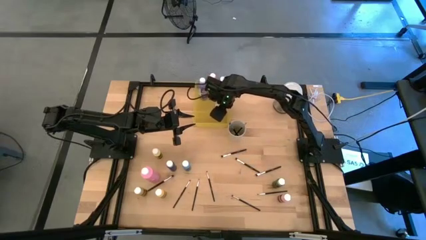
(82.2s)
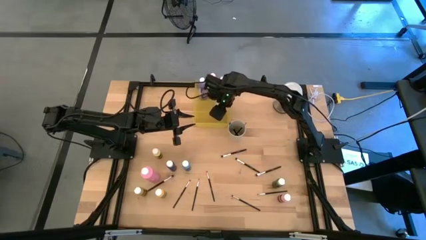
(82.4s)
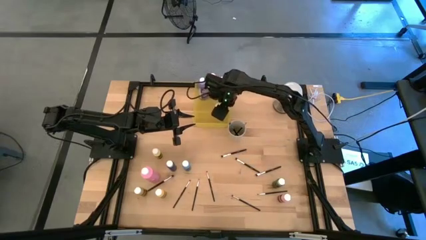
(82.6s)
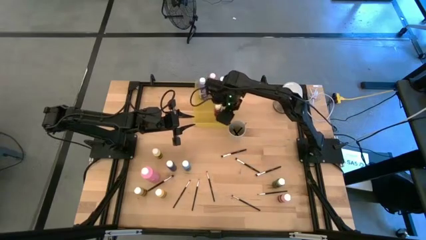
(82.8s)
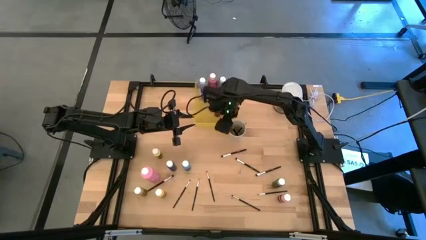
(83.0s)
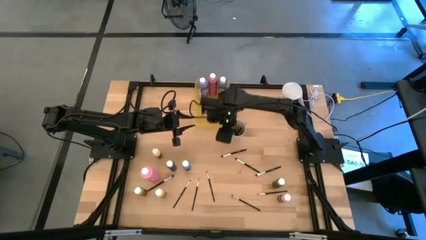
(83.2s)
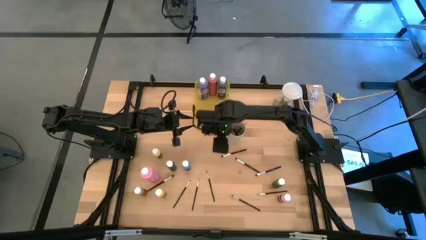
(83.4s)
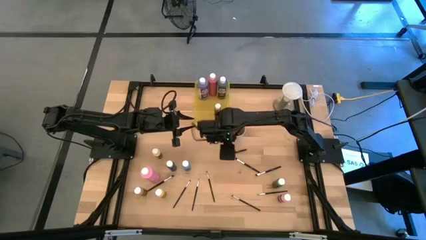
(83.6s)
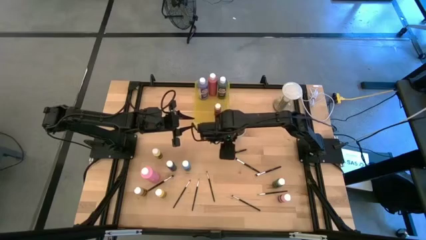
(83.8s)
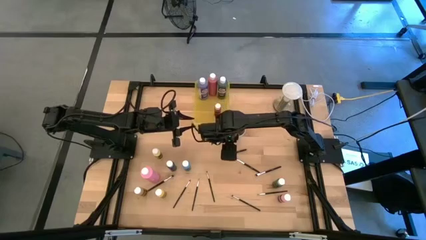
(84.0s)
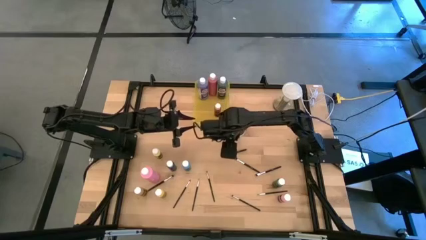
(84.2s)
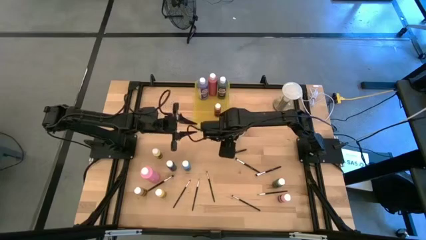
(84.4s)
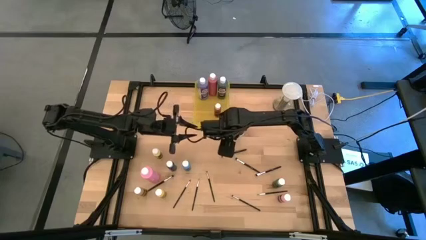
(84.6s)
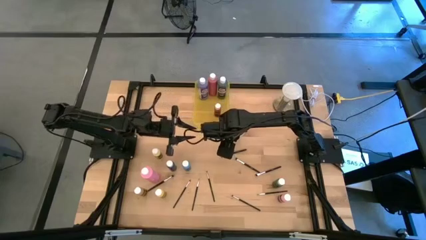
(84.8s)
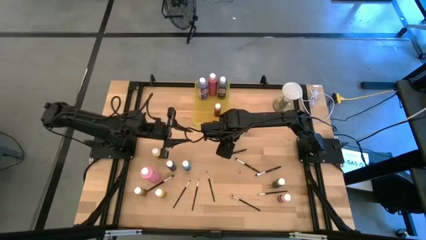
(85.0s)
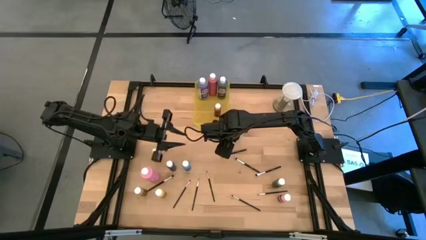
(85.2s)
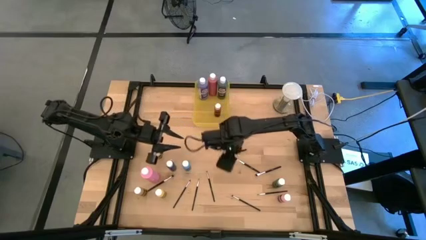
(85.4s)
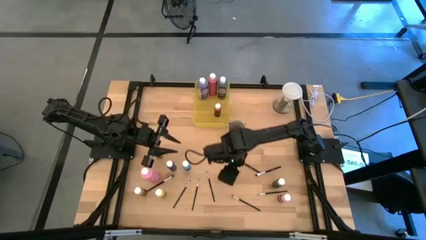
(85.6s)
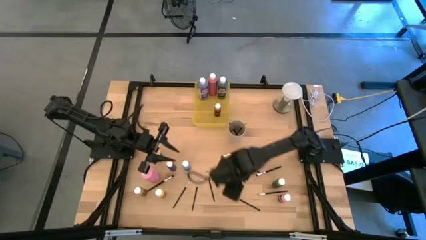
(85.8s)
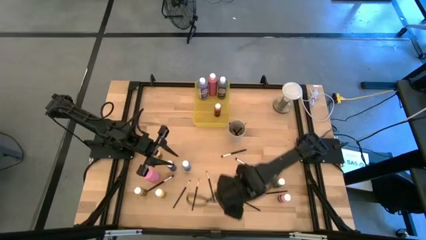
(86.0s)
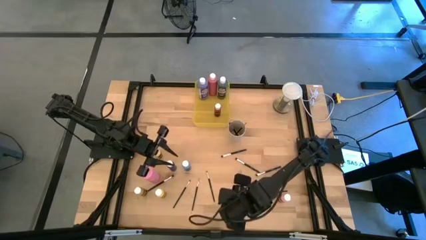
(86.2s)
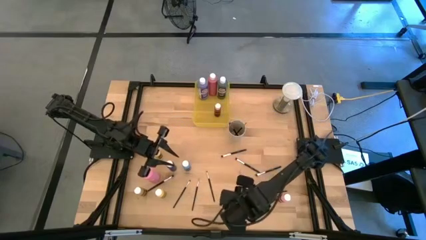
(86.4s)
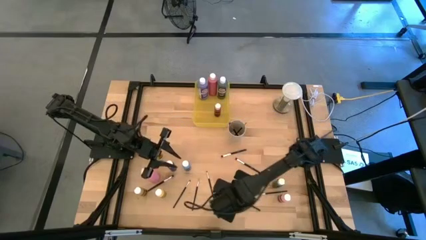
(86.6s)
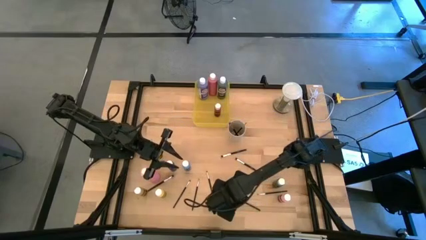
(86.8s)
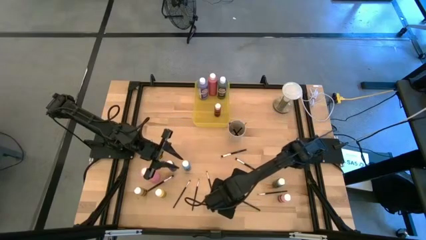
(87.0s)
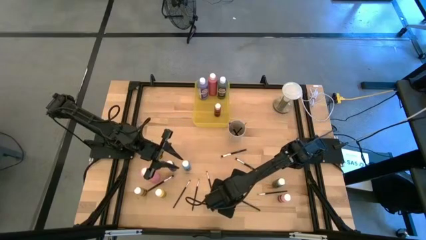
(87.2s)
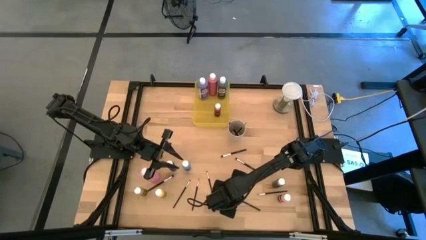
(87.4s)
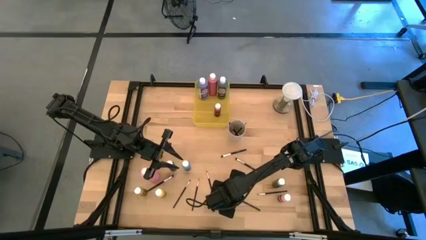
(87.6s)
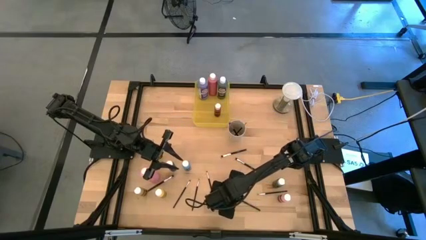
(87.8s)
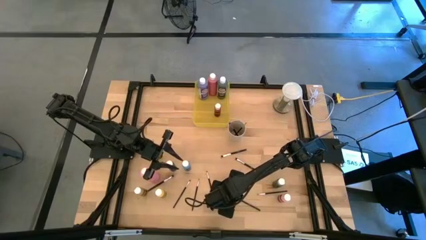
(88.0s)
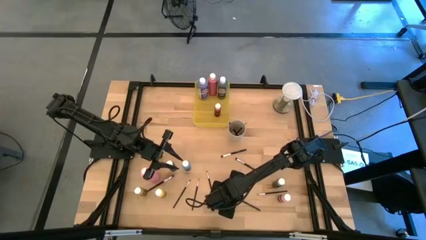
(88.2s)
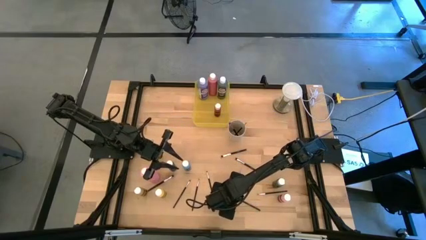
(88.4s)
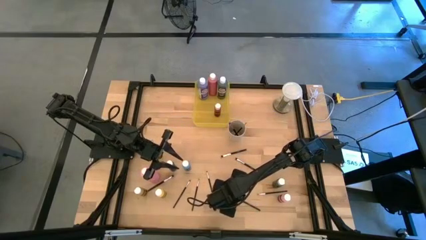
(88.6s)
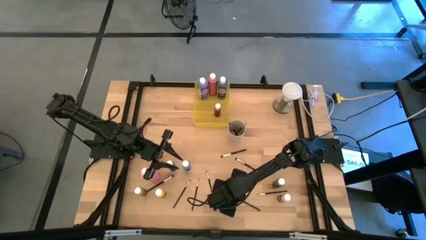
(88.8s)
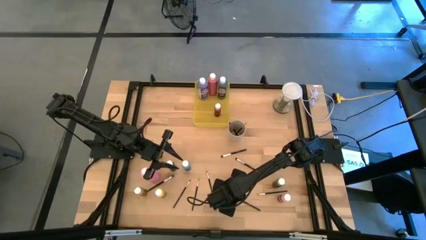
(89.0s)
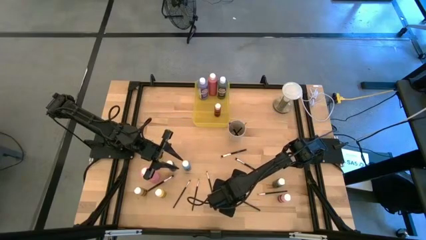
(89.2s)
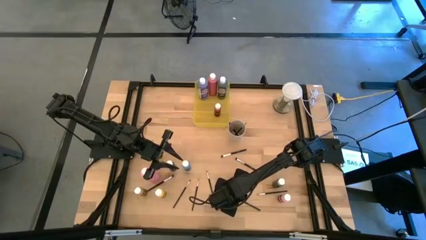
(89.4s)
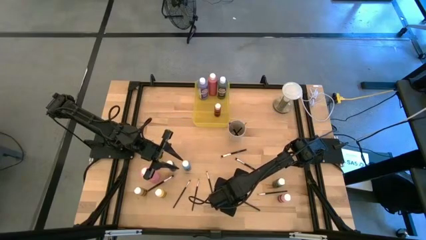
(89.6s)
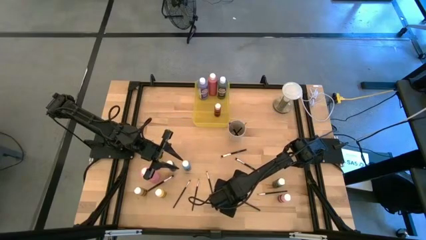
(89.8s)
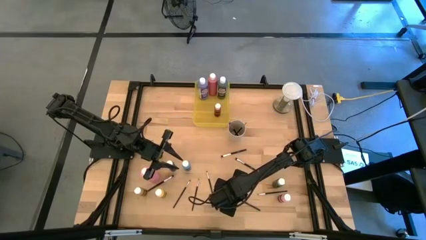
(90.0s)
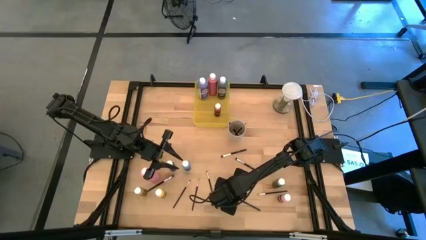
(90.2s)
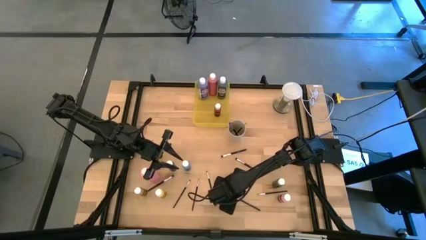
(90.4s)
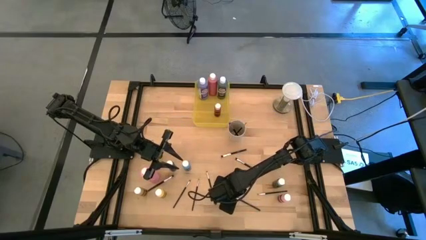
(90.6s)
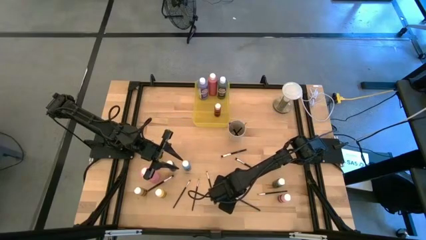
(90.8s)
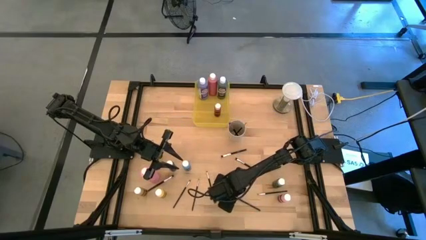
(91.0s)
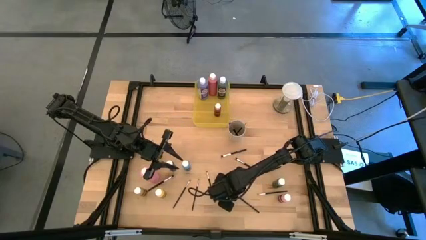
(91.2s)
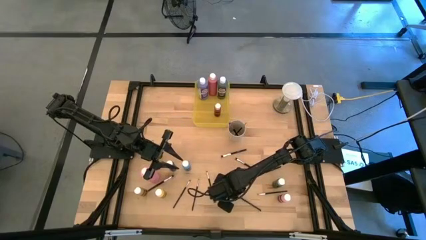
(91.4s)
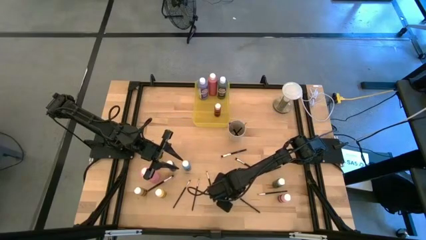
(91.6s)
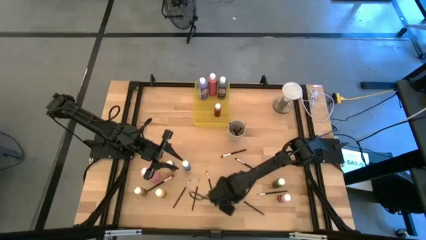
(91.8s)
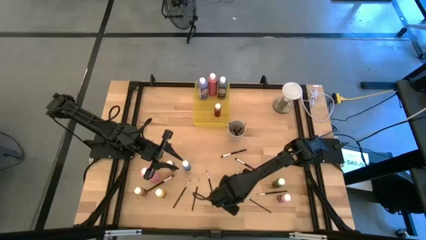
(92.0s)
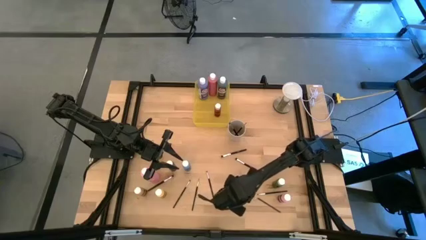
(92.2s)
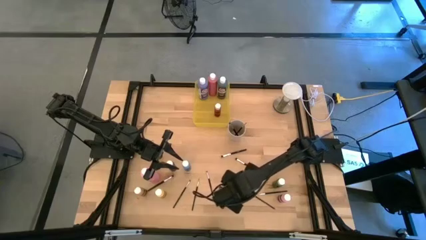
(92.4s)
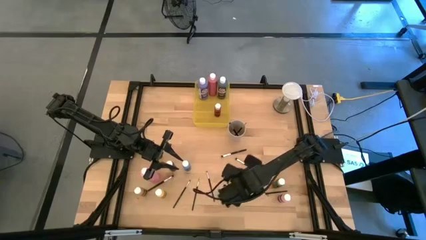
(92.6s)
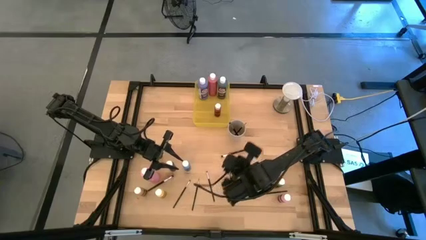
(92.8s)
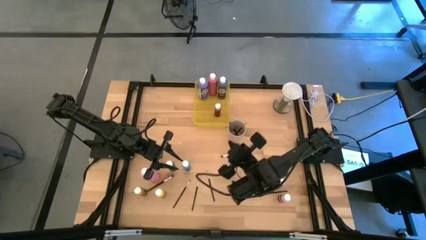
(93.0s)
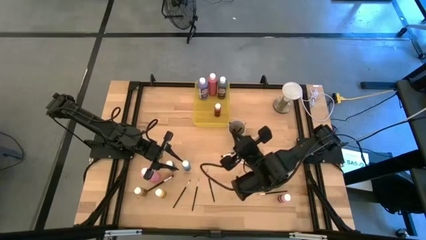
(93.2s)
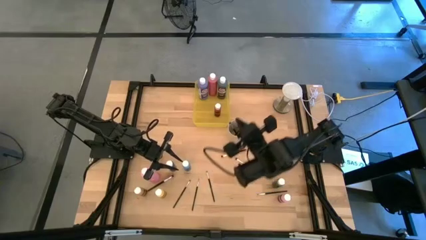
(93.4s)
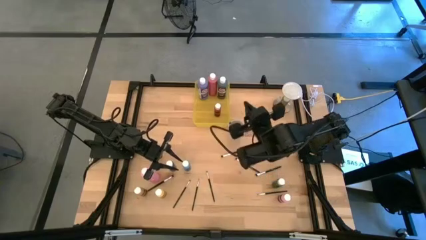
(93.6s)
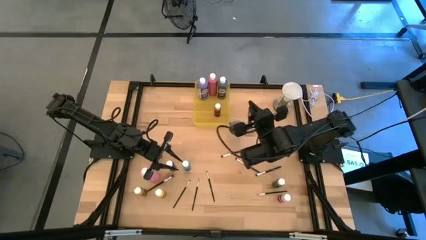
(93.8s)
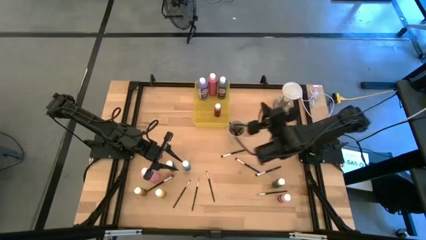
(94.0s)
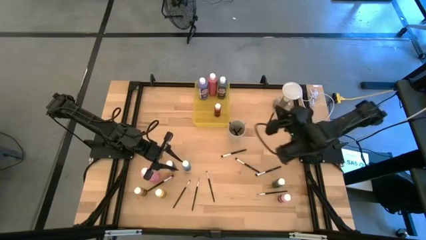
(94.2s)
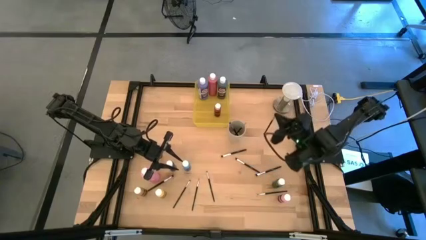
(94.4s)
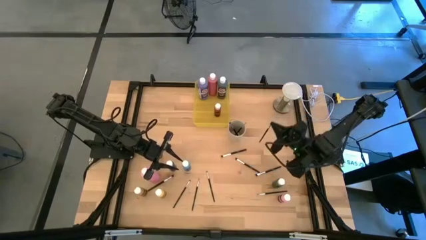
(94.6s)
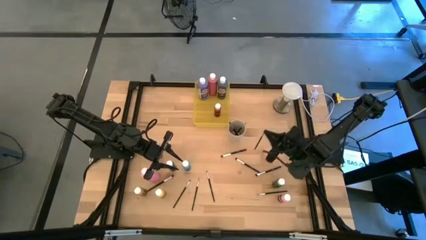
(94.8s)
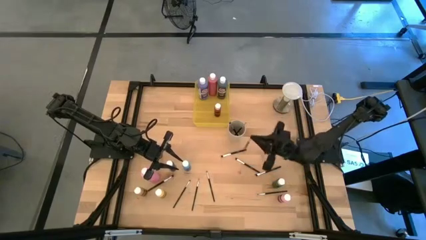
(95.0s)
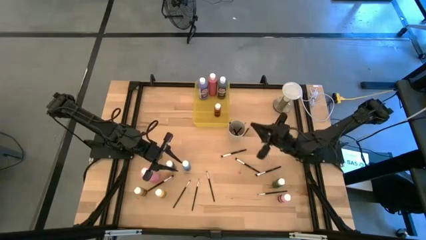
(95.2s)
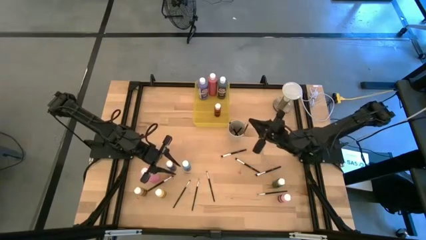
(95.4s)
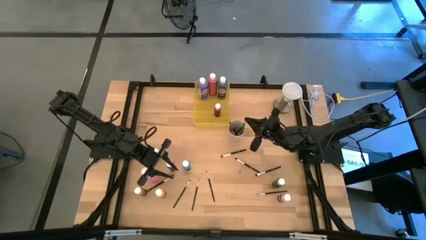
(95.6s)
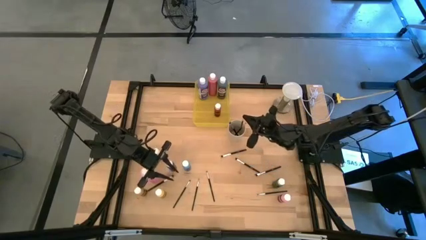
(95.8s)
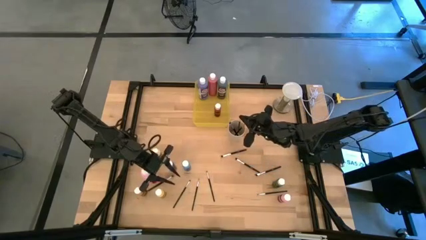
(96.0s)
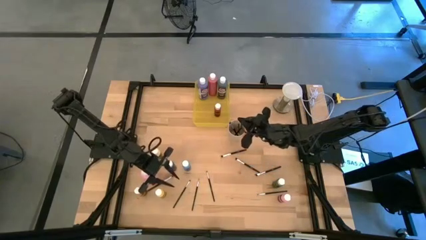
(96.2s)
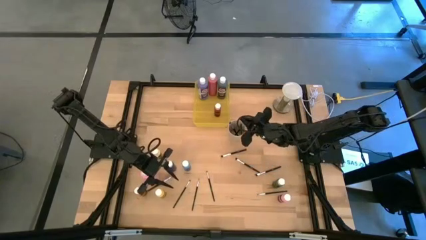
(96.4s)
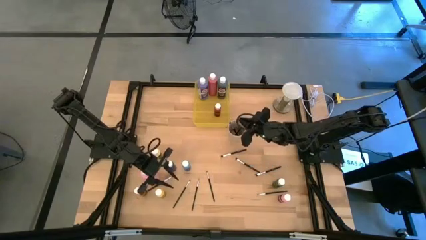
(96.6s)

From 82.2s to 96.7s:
Task: Pick & Place Paint Supplies
Put the black paintbrush into the white cup

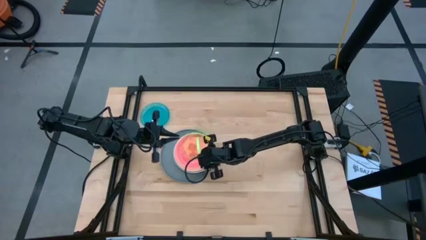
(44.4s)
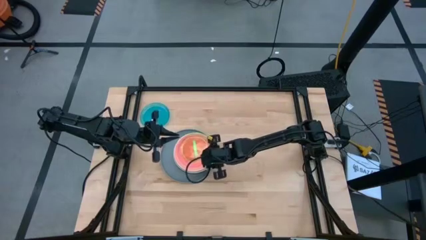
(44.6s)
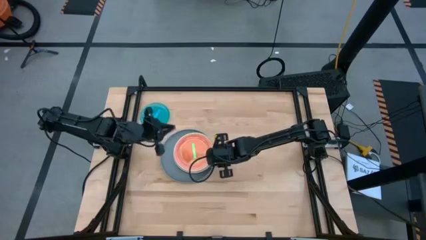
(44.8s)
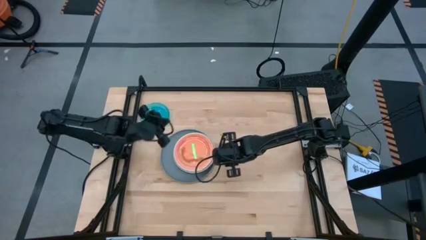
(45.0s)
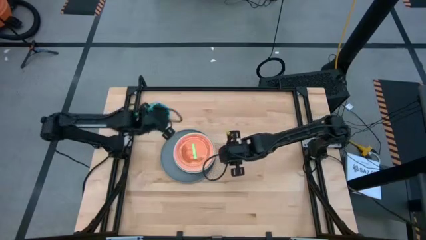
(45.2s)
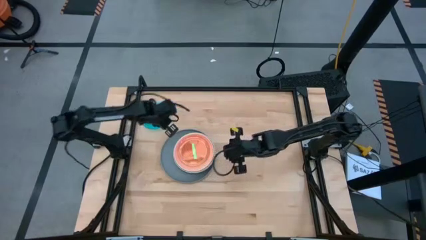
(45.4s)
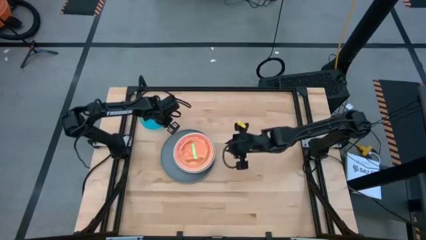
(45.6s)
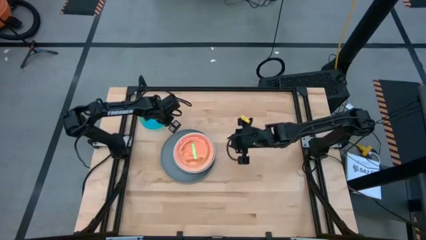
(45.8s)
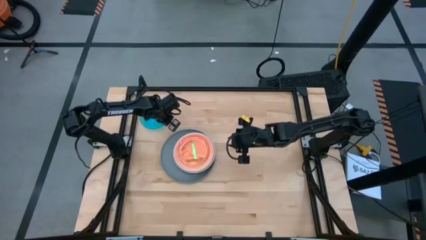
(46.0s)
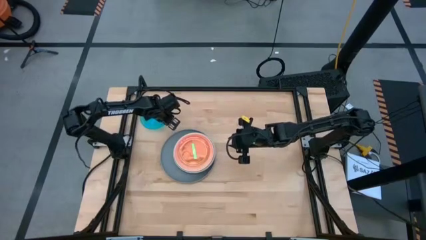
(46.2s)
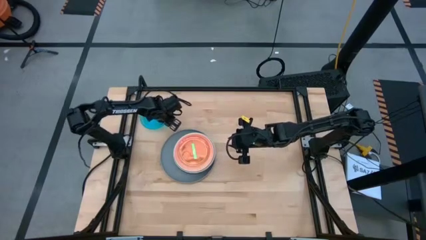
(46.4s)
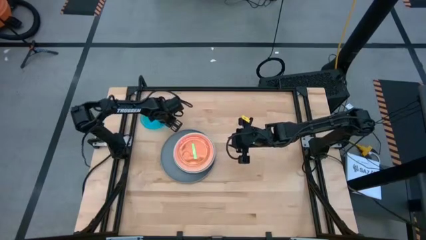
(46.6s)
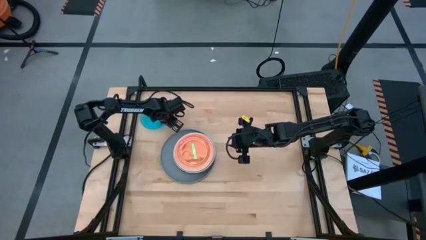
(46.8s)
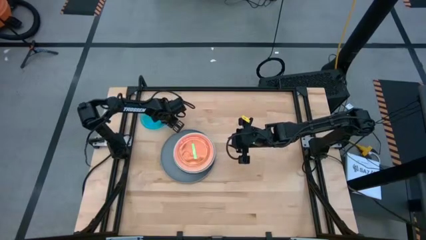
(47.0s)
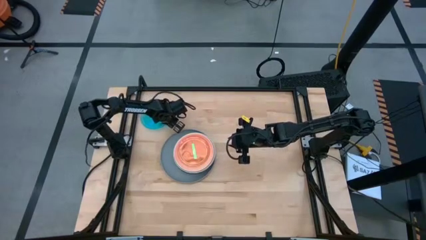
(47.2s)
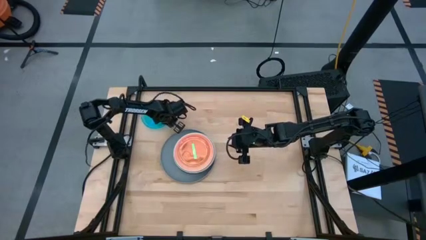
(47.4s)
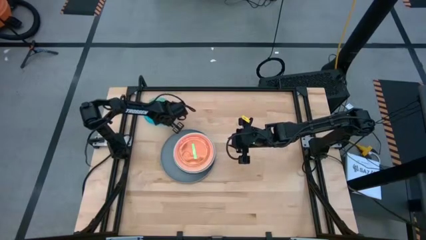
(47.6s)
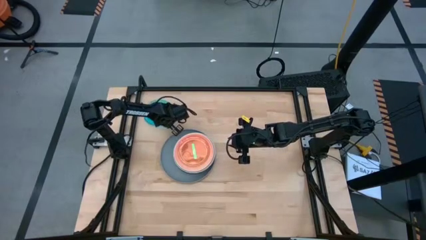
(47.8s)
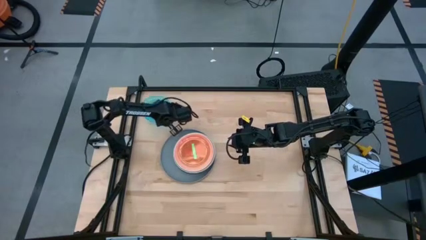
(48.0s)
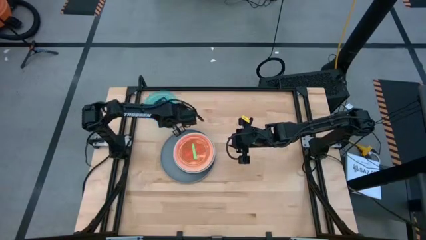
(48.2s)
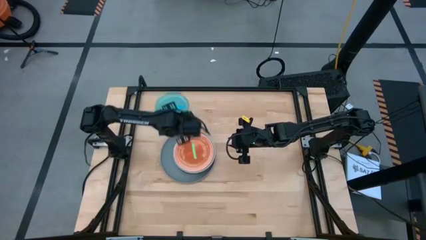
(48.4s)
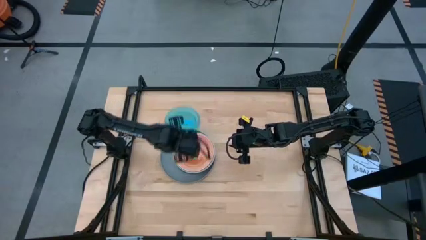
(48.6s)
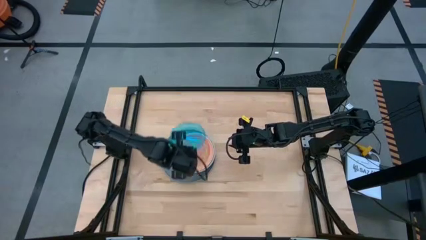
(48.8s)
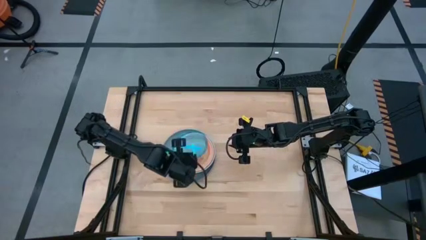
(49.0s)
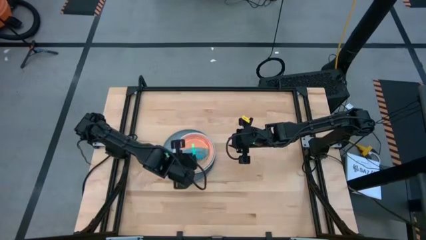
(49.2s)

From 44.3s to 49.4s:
Task: Stack plastic plates
Stack the blue plate on top of the green plate
